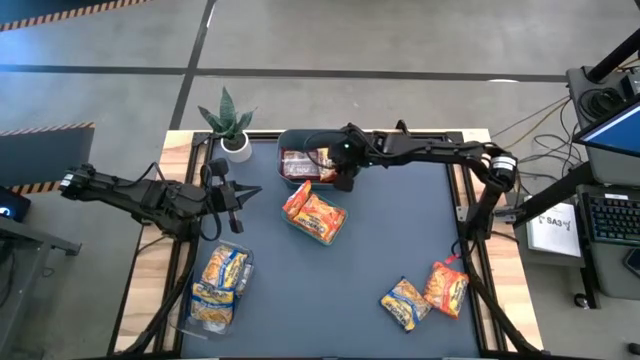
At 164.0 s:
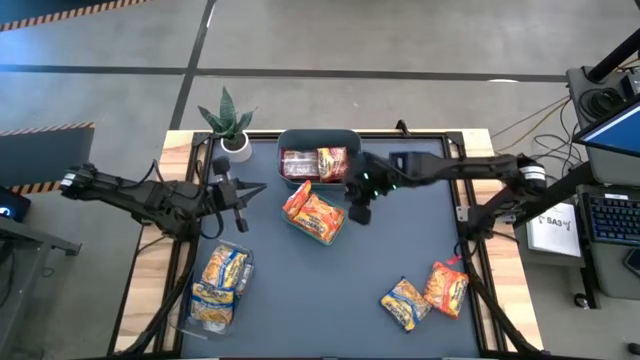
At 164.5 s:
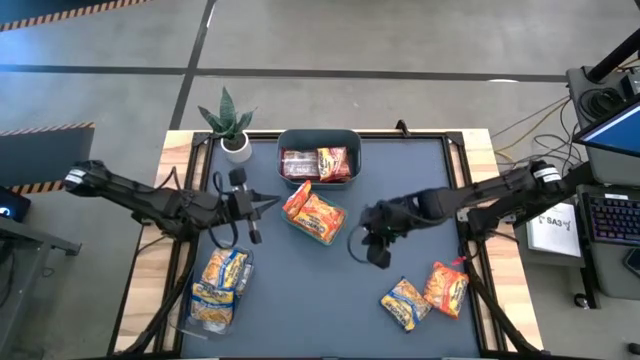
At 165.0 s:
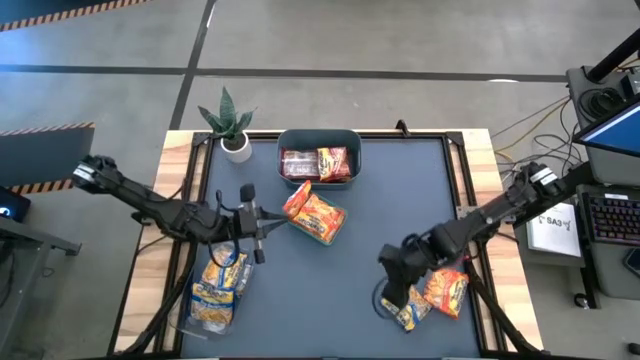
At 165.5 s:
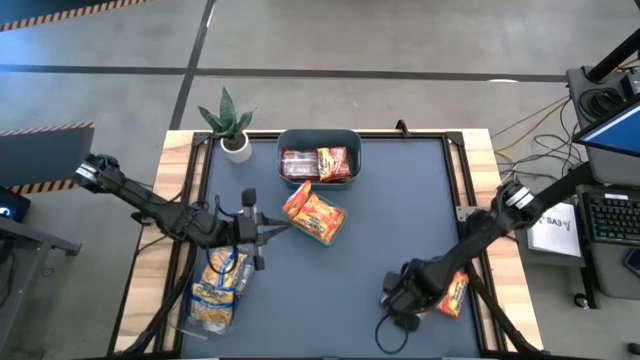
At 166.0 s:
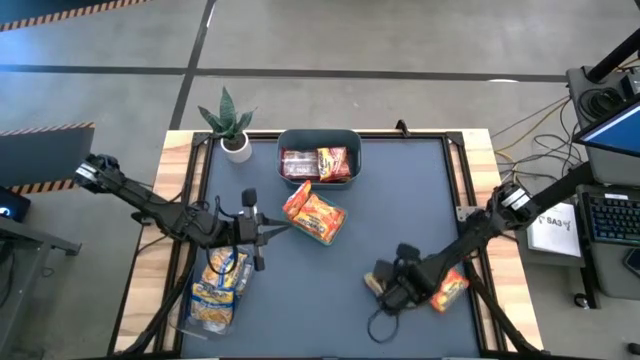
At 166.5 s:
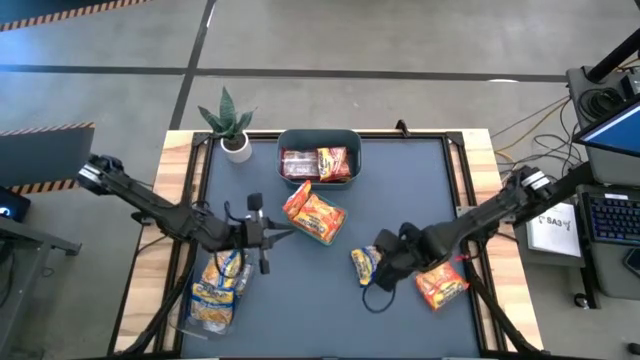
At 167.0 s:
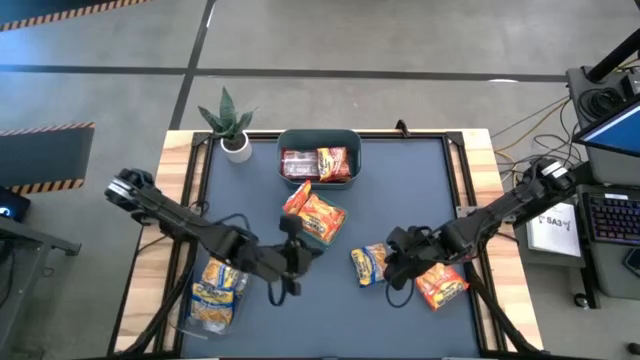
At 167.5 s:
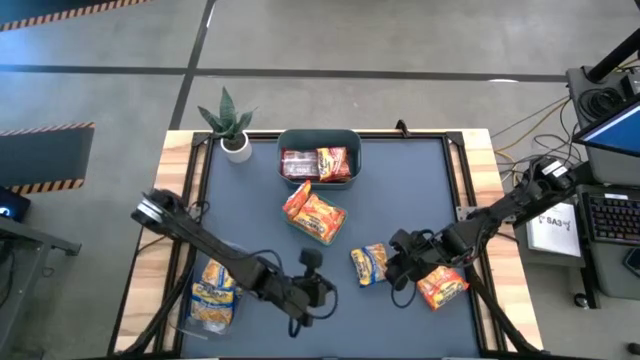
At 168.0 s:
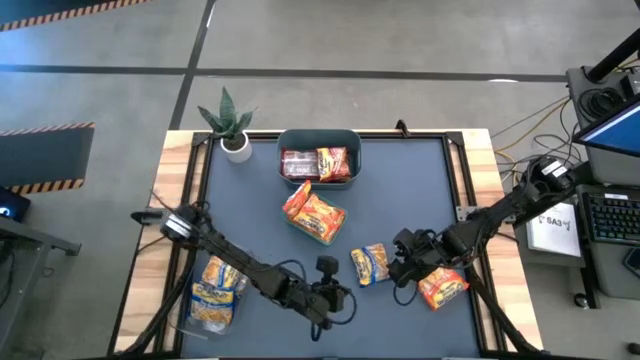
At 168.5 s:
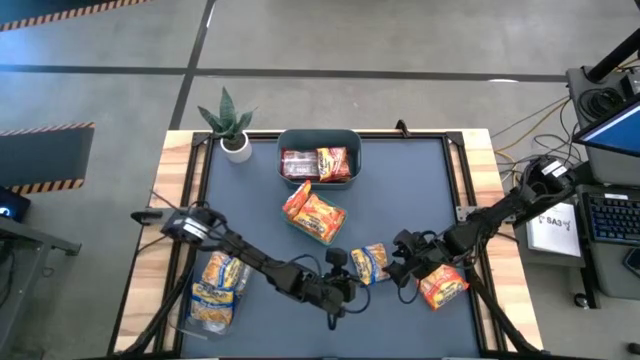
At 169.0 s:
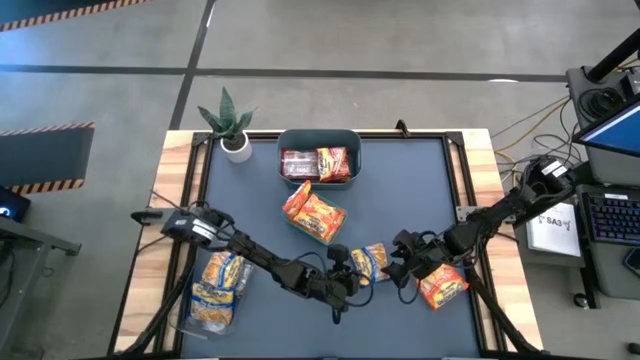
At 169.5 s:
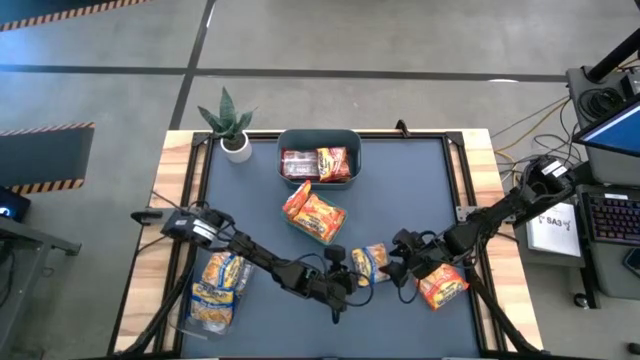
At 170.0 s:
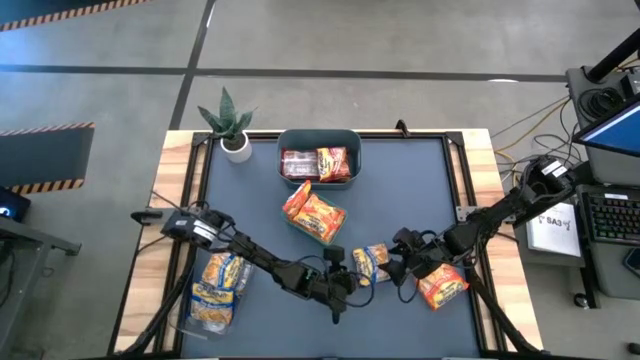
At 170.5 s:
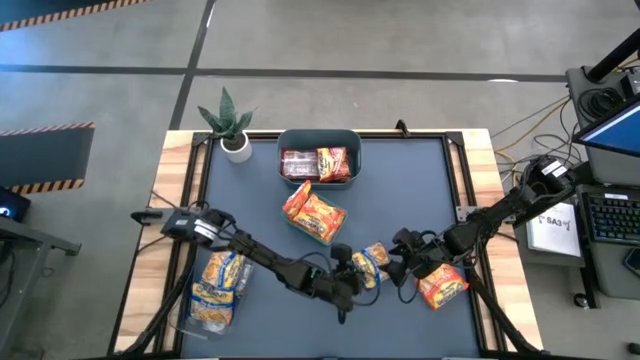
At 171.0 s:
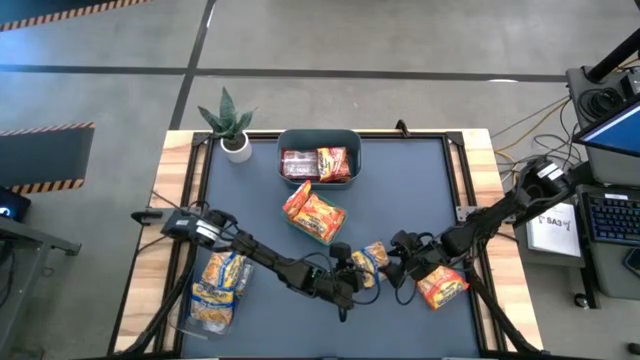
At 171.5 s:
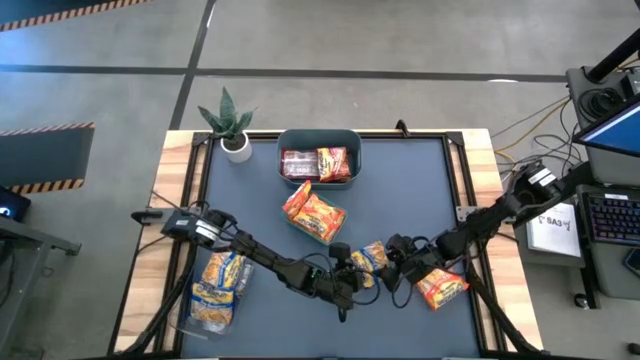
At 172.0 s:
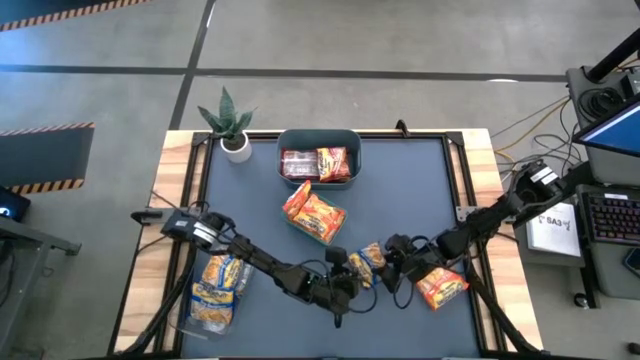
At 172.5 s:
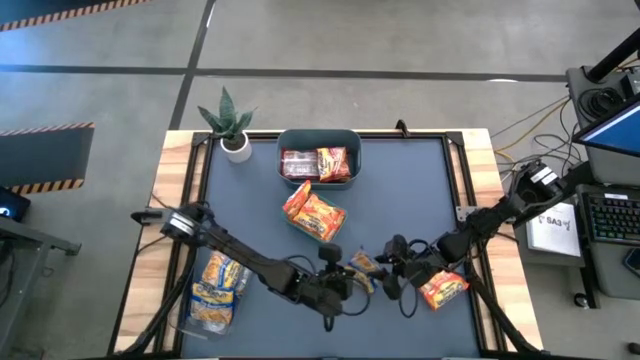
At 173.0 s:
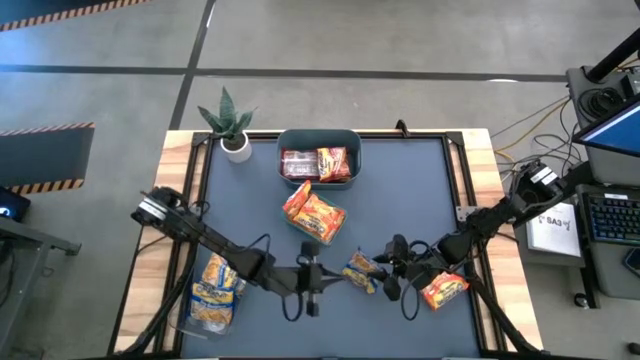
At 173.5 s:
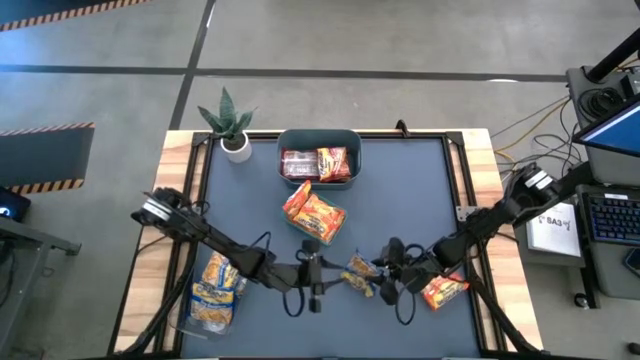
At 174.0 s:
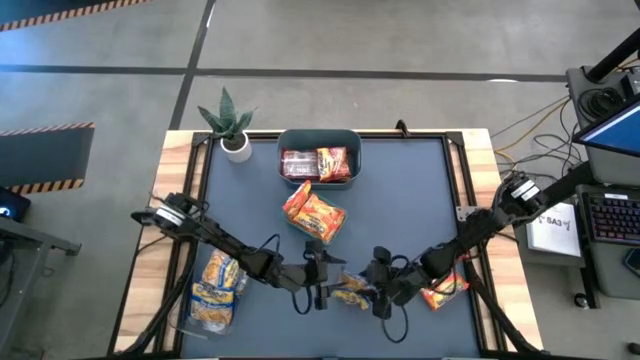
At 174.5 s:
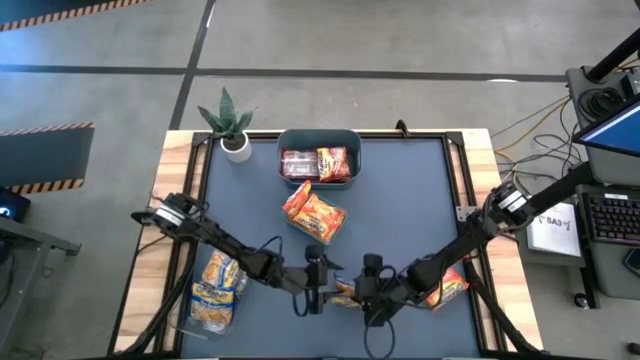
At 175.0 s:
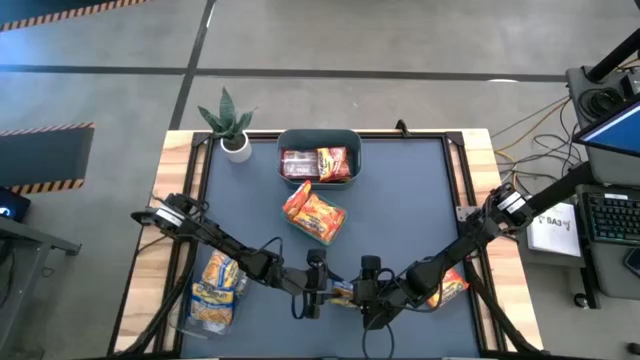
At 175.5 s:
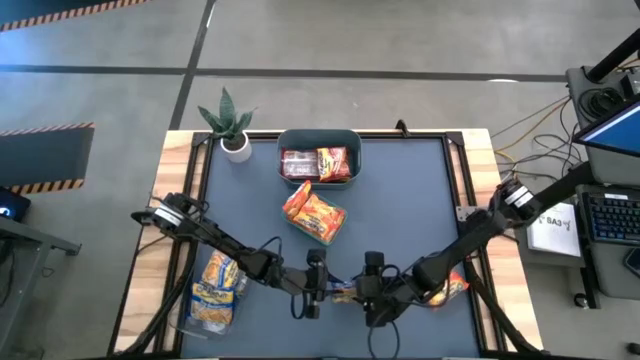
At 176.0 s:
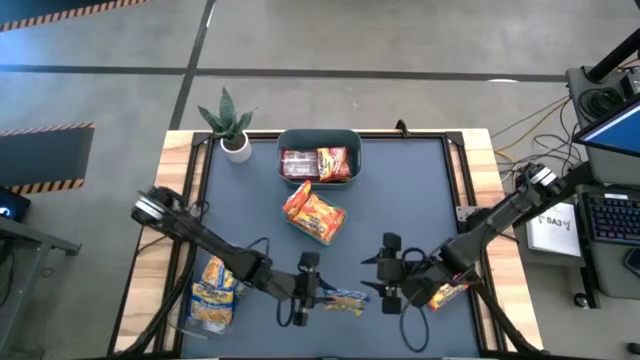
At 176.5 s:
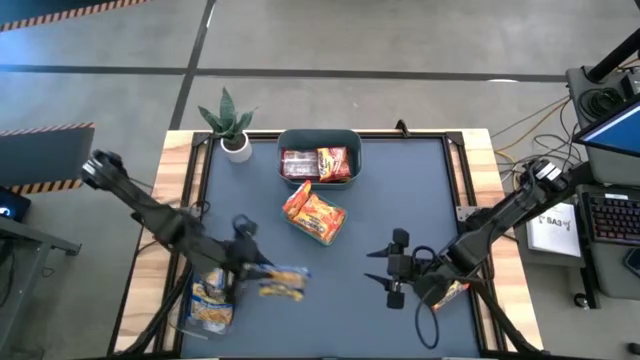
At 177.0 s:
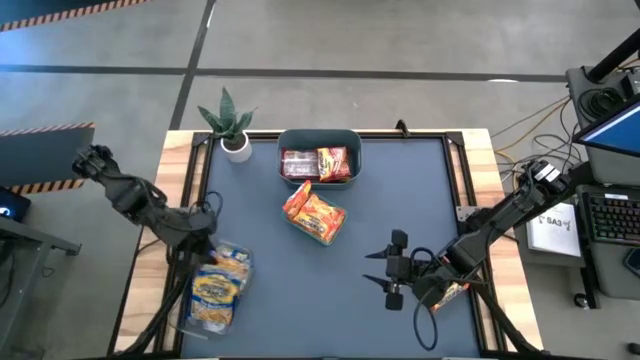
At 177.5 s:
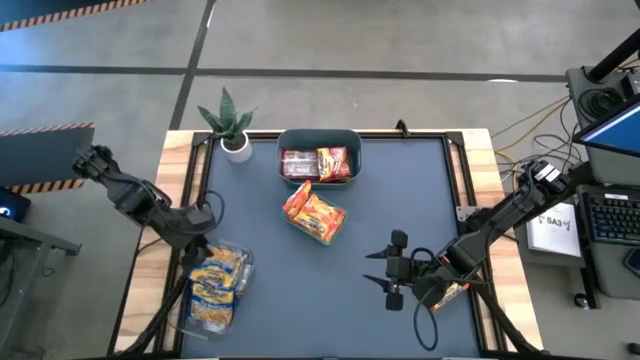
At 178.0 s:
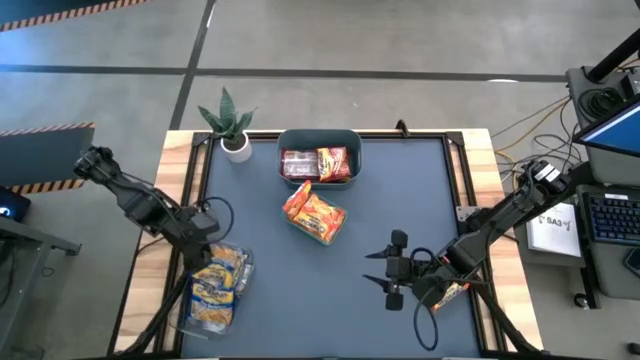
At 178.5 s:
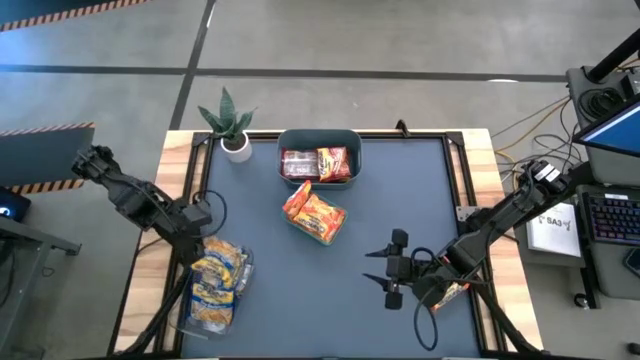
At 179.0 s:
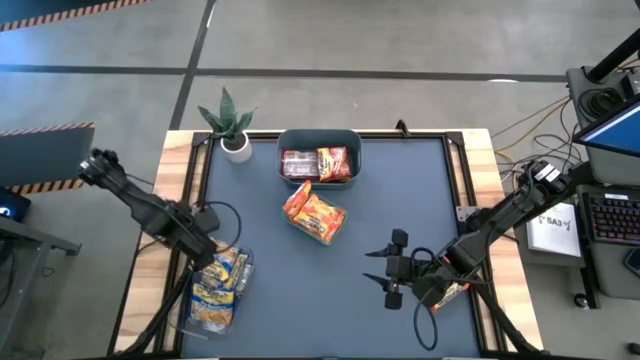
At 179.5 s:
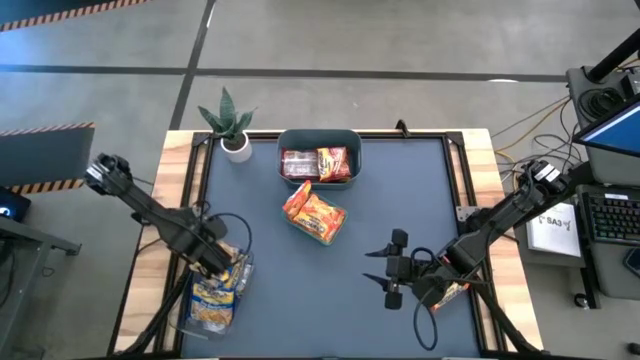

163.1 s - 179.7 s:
Task: Sort Maruchan noodles
Put the blue noodle pack into the transparent bin

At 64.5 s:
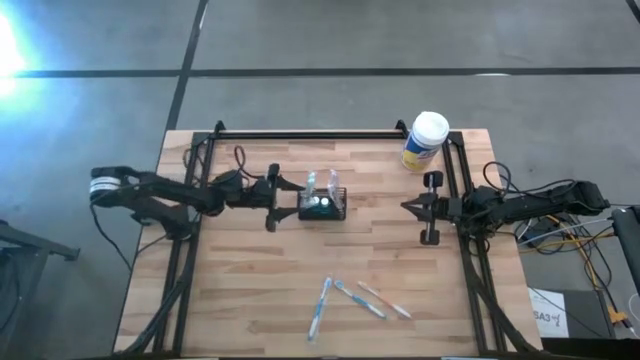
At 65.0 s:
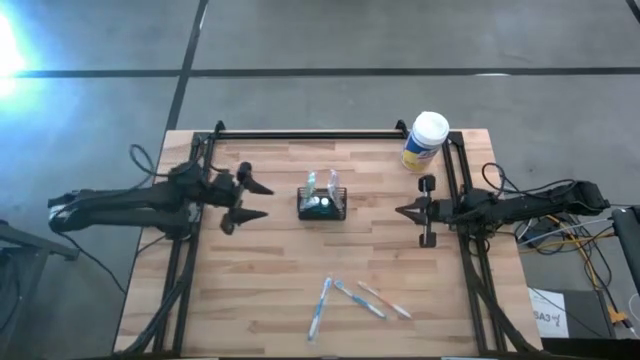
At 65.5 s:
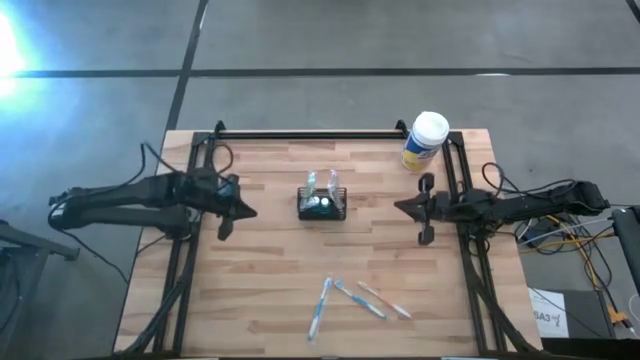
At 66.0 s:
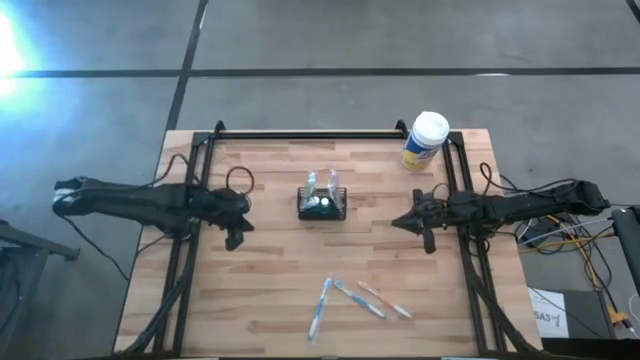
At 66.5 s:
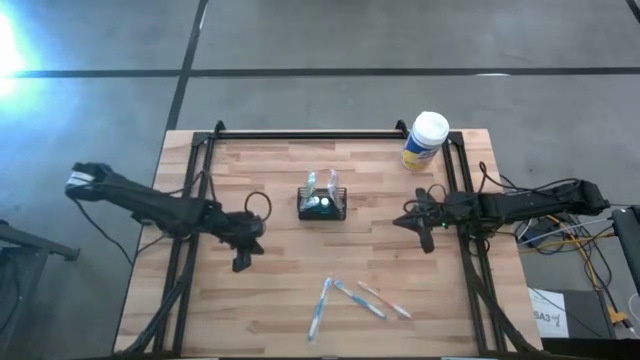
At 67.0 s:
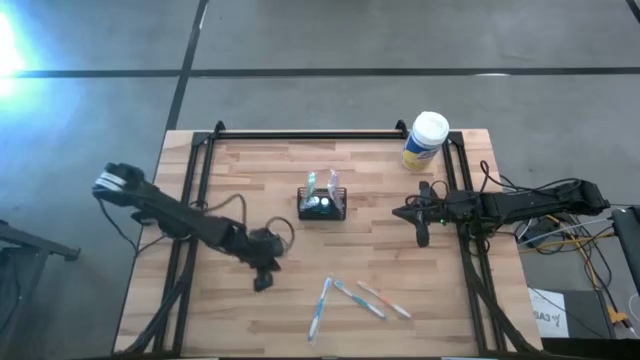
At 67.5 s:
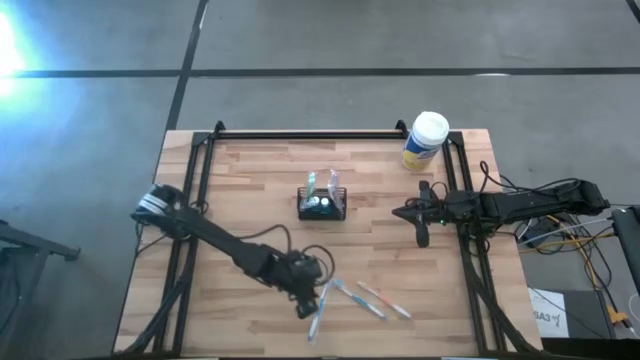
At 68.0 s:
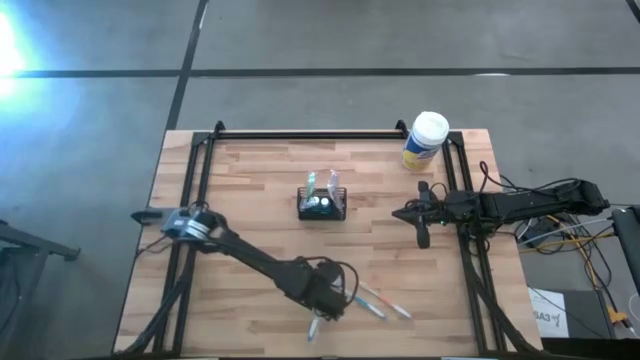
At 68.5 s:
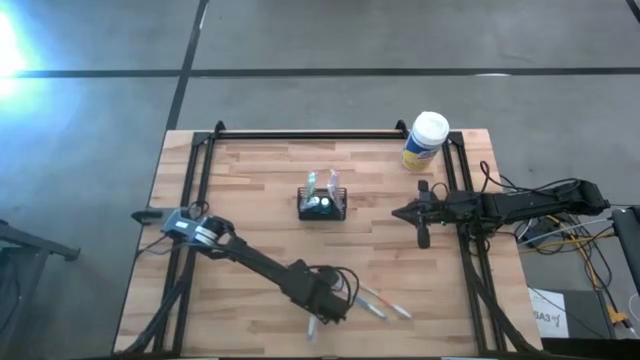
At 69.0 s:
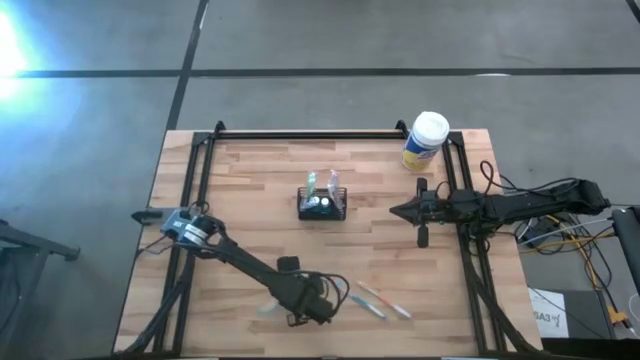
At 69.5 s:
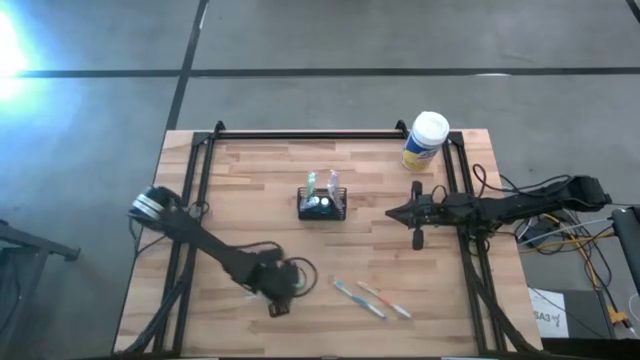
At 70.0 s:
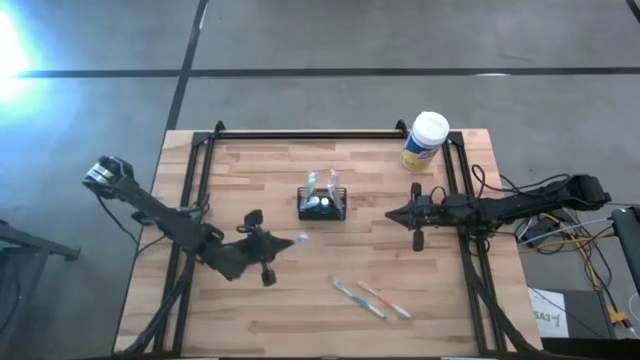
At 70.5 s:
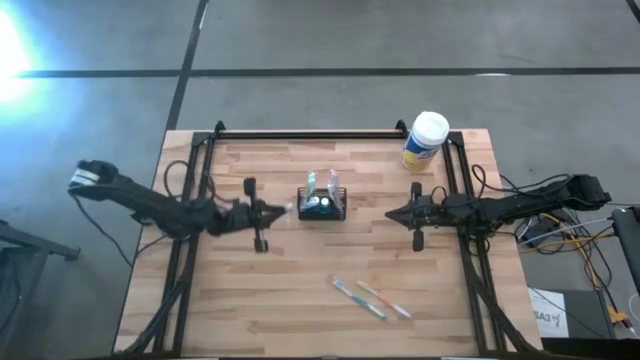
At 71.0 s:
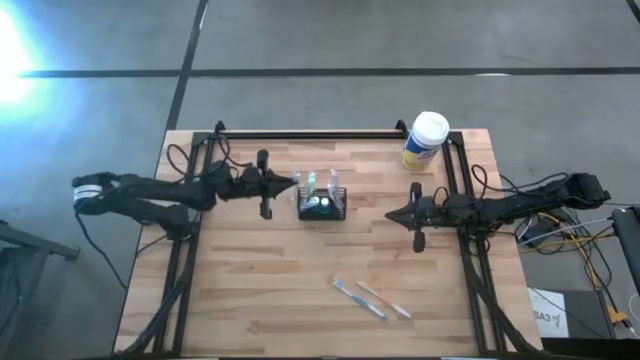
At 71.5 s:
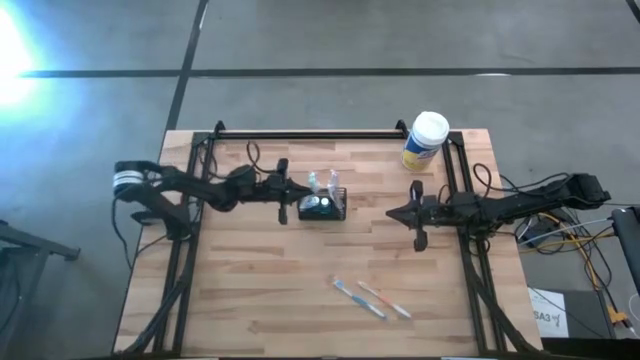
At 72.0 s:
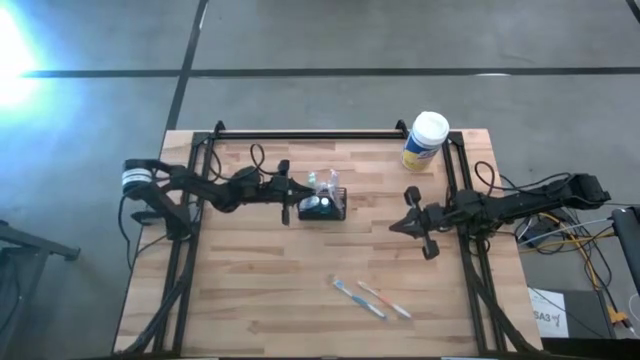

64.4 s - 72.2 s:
Task: Pick & Place toothbrushing station
Put the left blue toothbrush in the wire organizer
